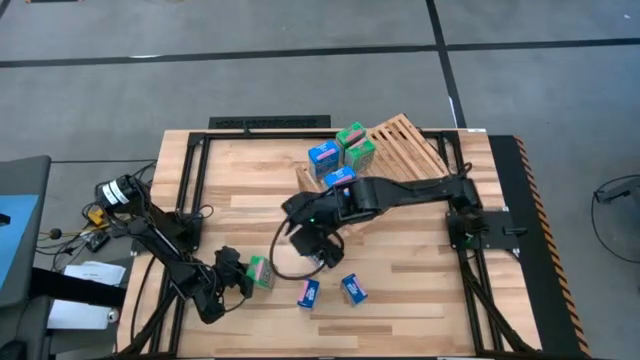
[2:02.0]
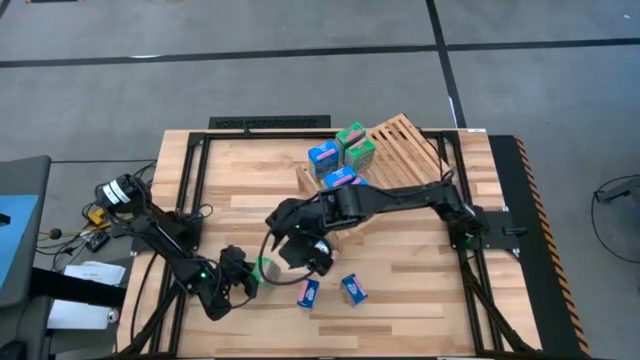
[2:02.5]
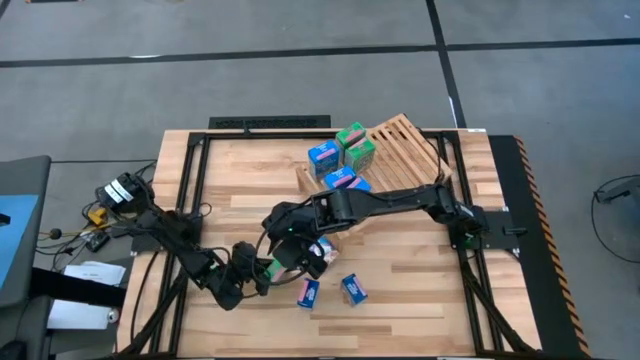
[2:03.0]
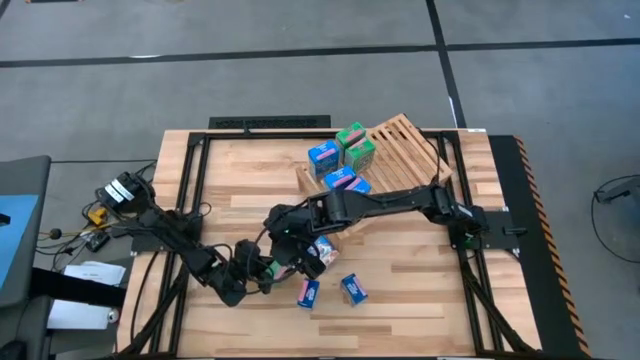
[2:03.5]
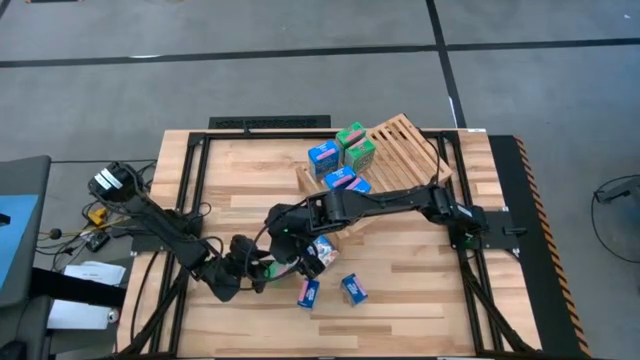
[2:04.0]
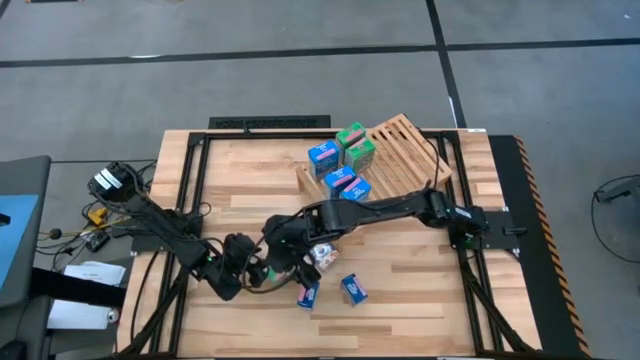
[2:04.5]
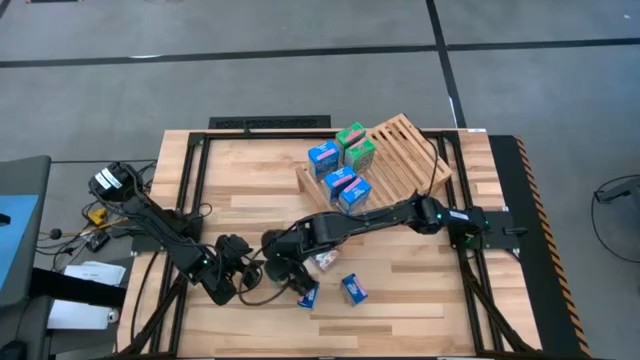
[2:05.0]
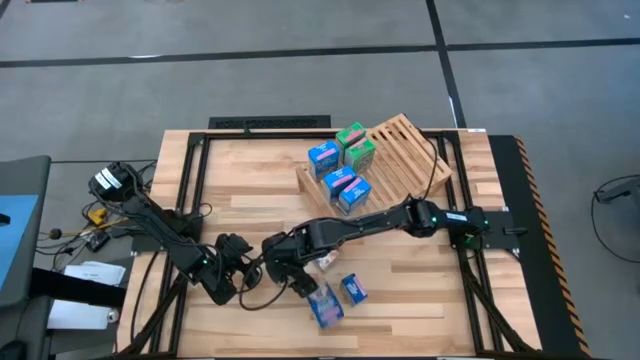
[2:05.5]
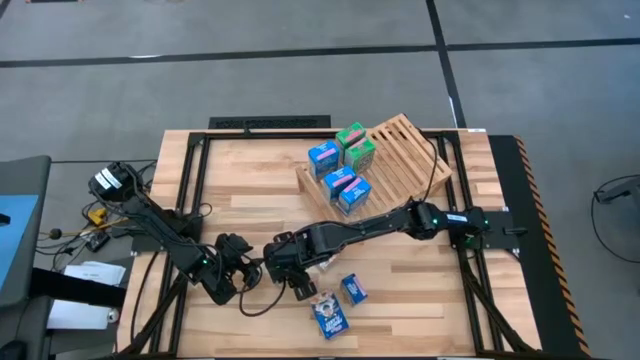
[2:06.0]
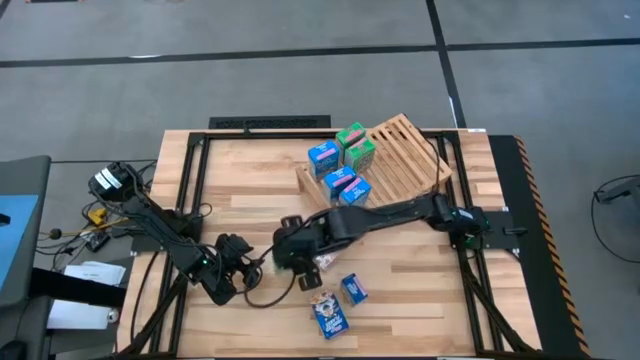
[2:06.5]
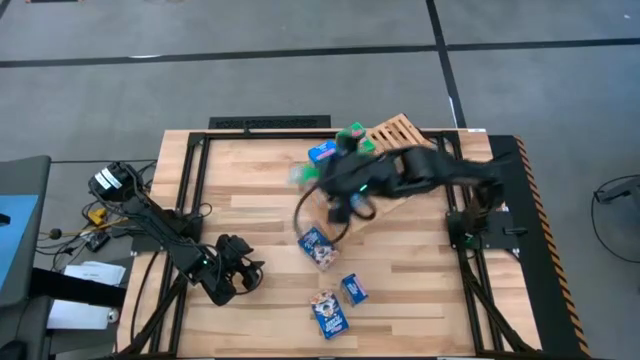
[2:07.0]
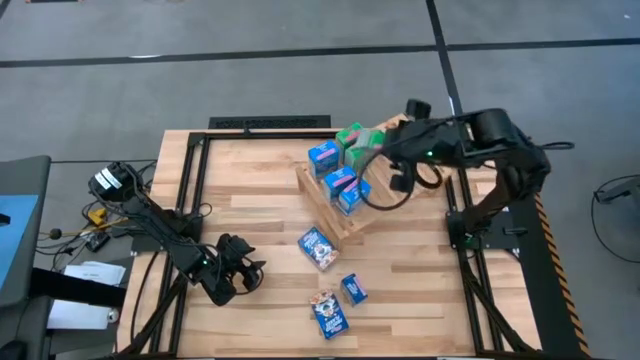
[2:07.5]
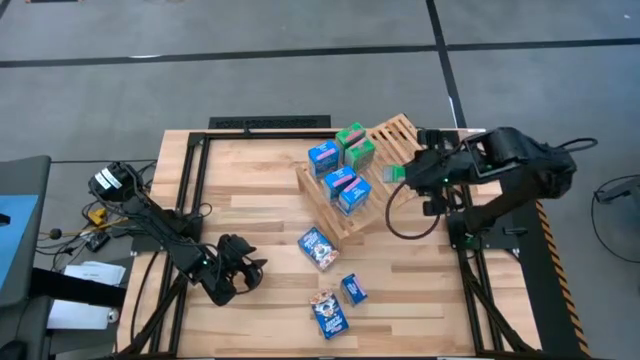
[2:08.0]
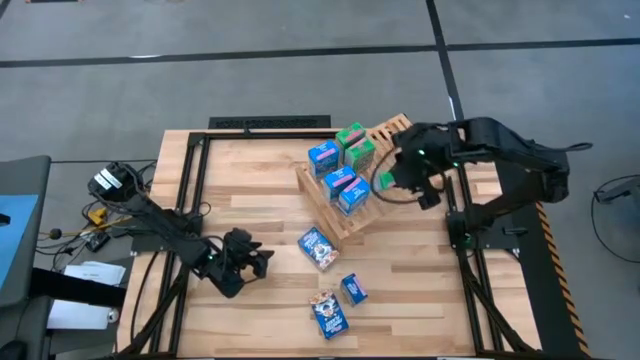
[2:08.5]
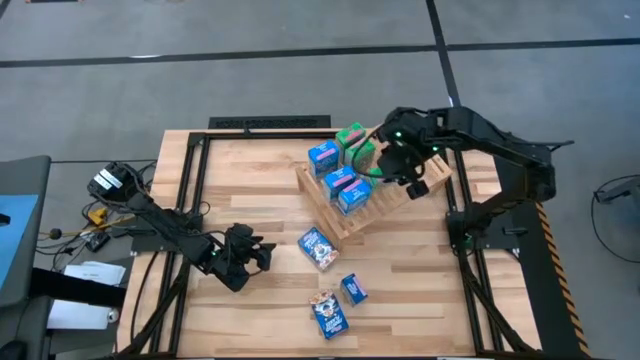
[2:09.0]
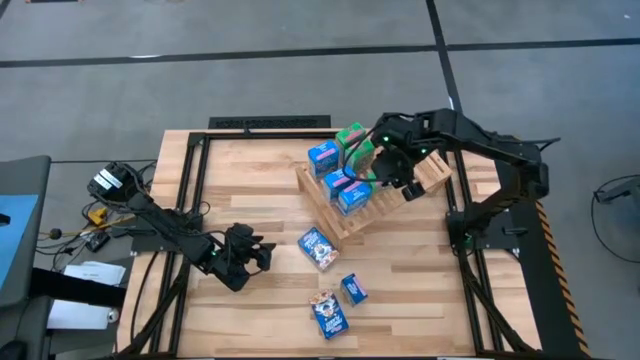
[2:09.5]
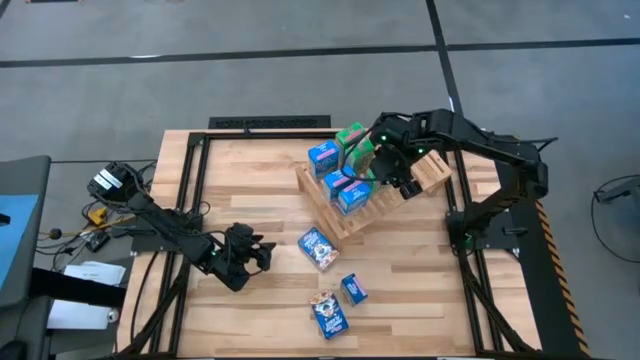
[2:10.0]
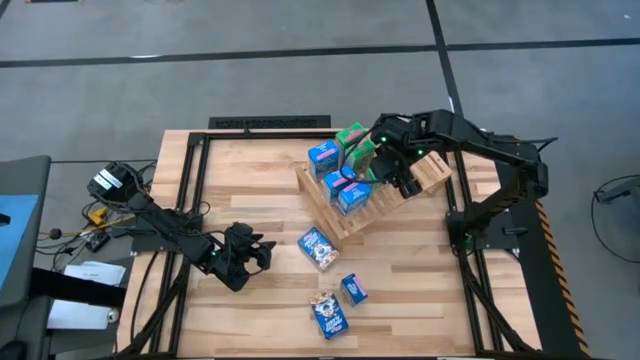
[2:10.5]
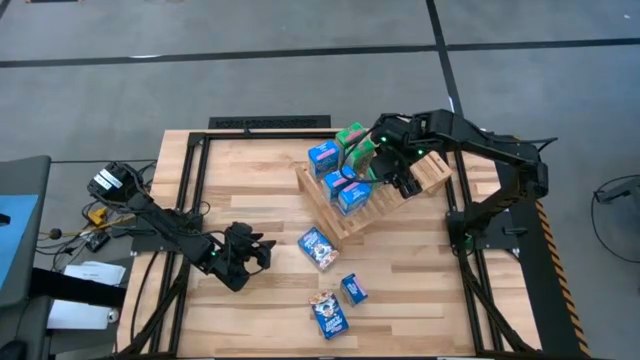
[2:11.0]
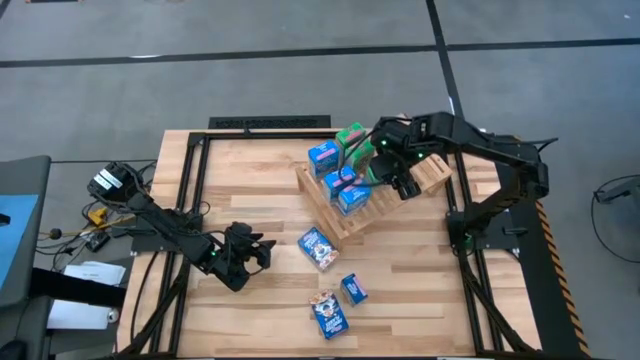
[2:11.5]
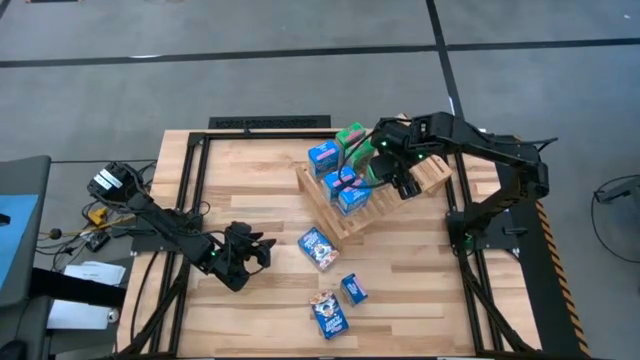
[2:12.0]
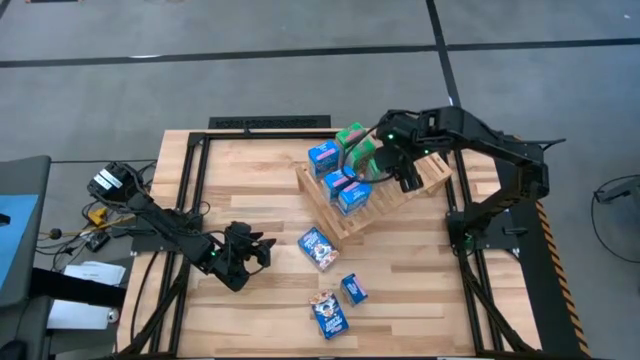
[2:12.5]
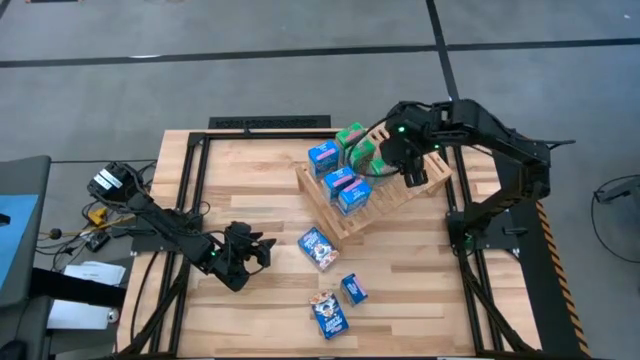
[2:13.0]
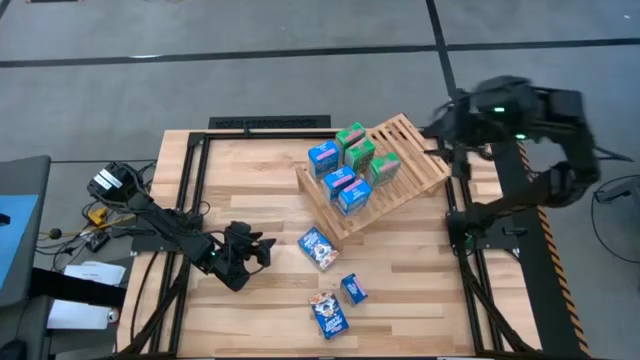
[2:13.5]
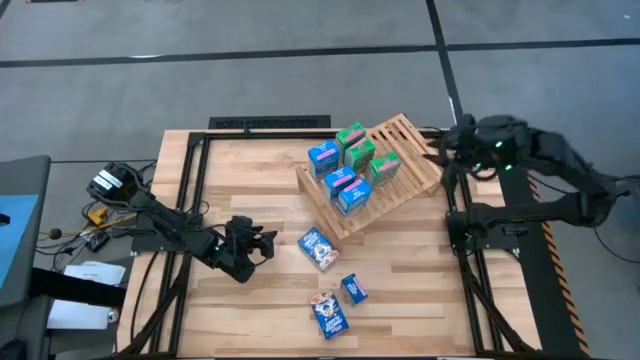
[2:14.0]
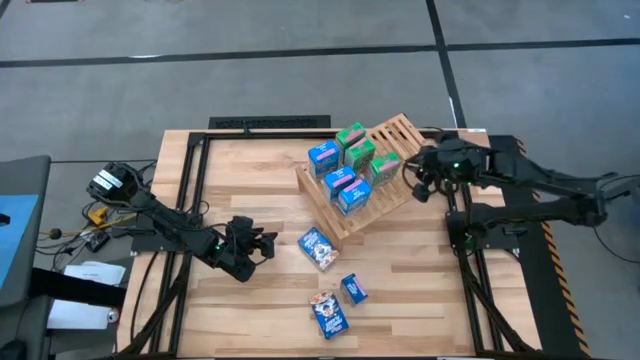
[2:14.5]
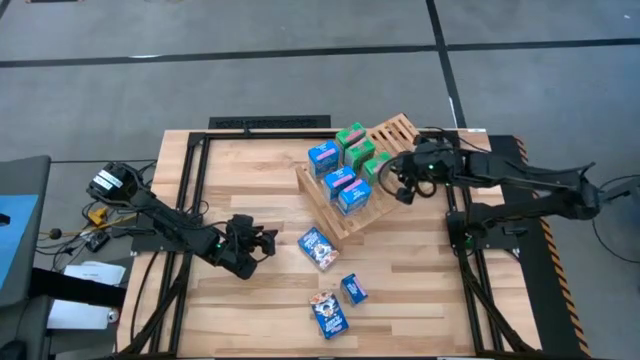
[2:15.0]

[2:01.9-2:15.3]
Task: Stack cereal on shelf
Put the green cereal box aligned with the other green cereal boxes on the shelf

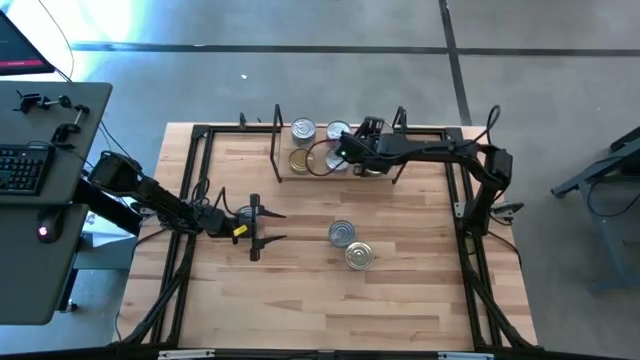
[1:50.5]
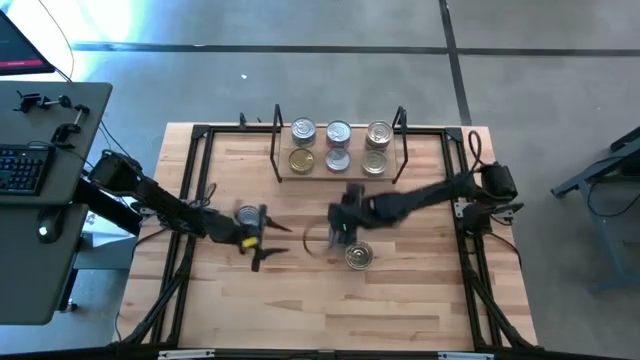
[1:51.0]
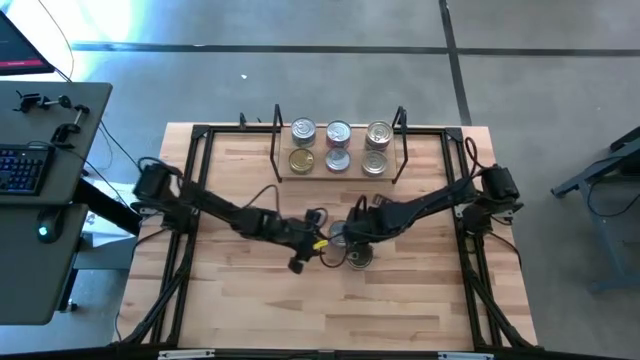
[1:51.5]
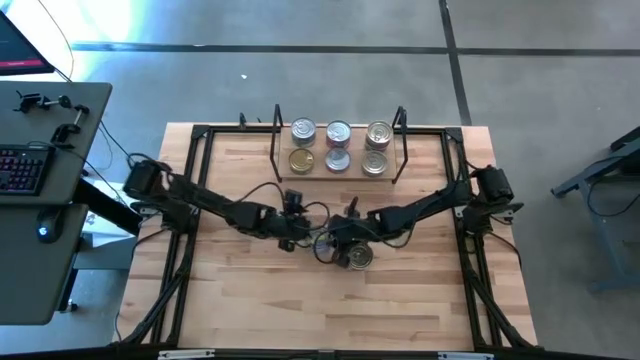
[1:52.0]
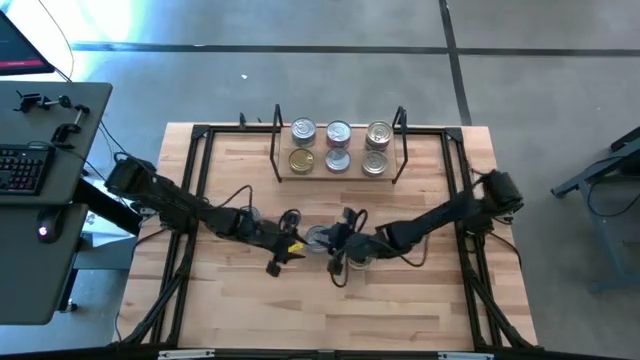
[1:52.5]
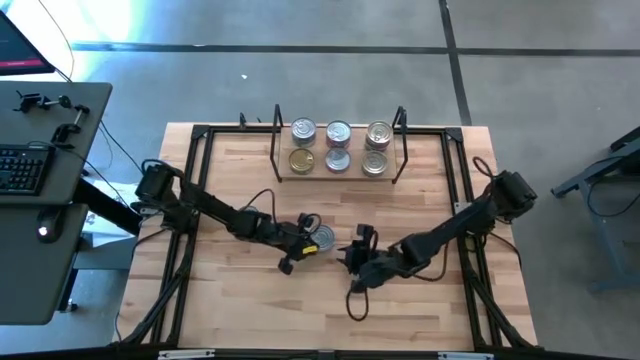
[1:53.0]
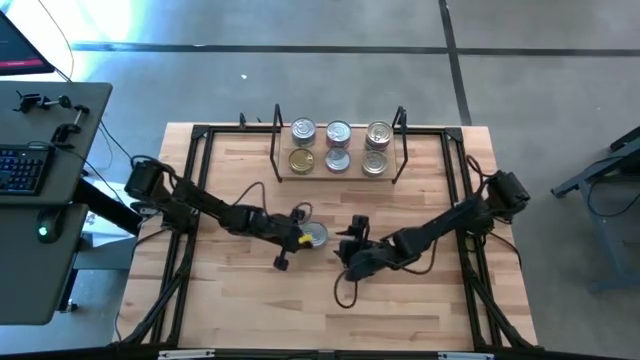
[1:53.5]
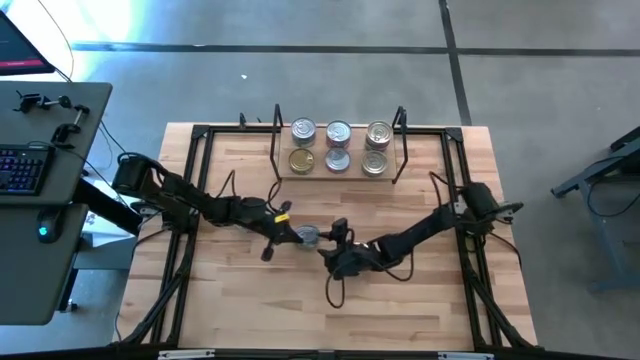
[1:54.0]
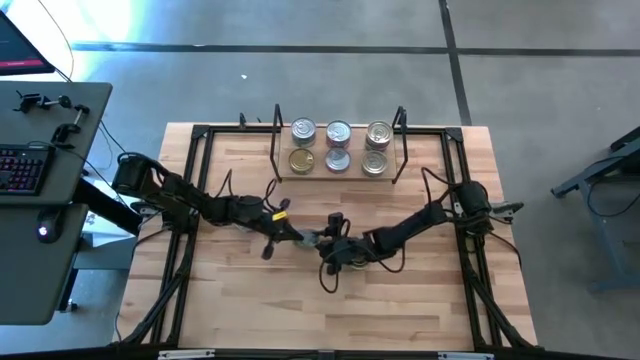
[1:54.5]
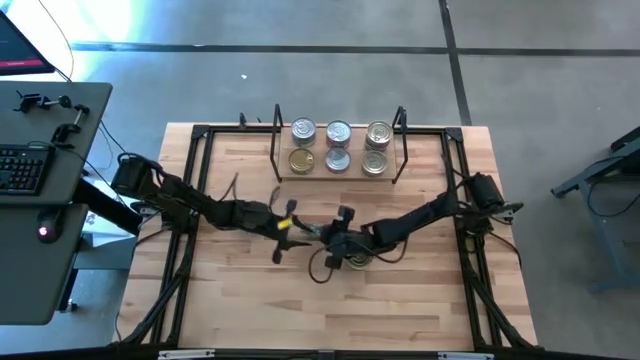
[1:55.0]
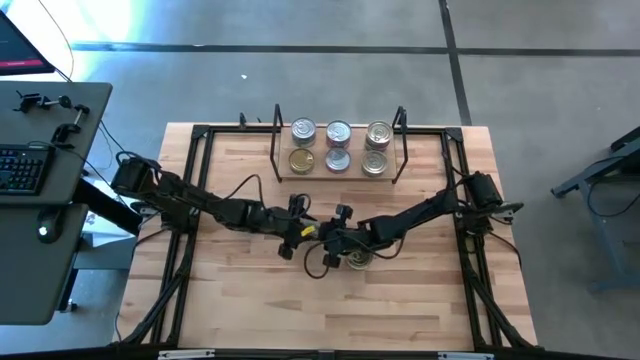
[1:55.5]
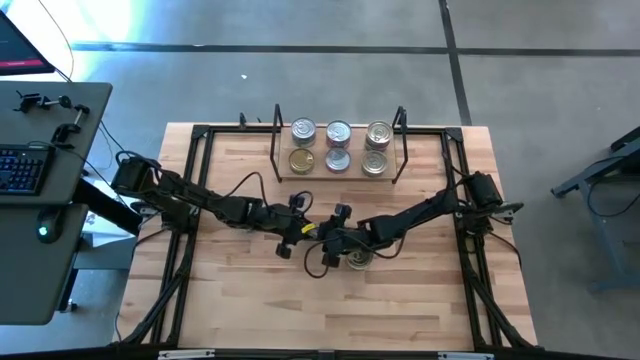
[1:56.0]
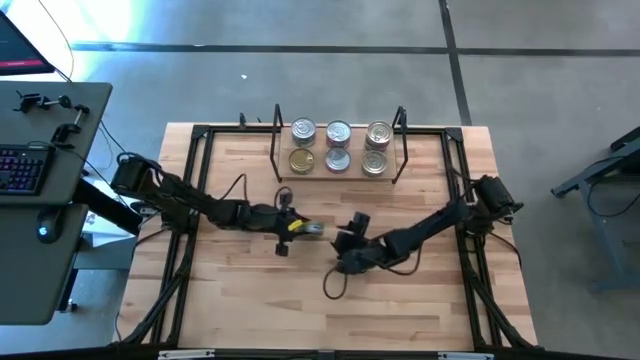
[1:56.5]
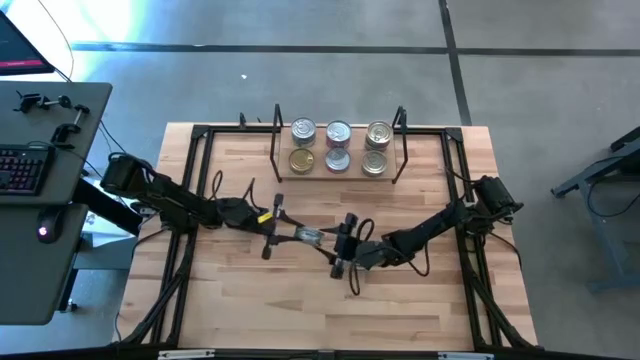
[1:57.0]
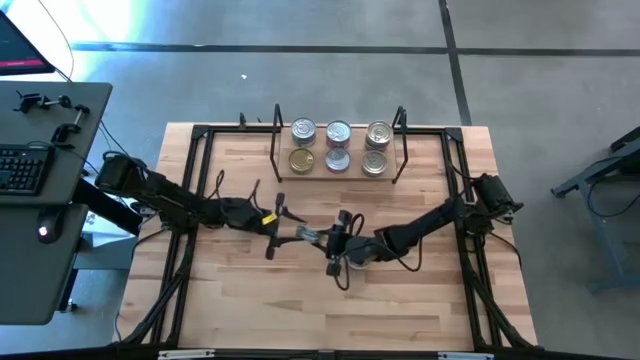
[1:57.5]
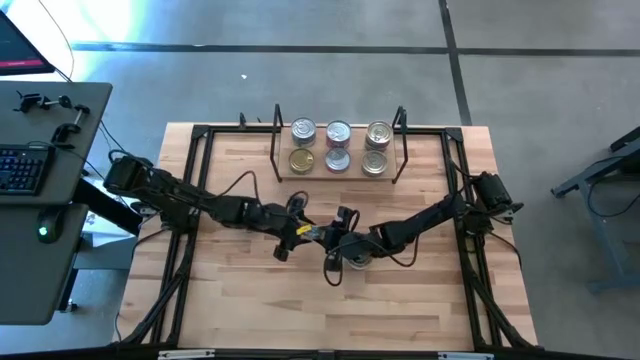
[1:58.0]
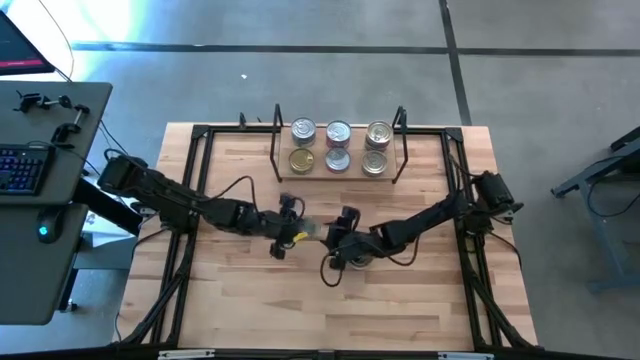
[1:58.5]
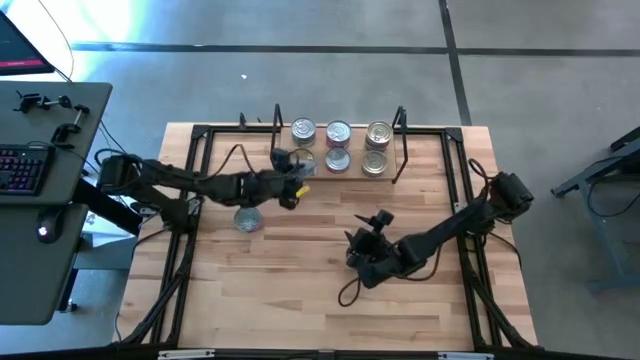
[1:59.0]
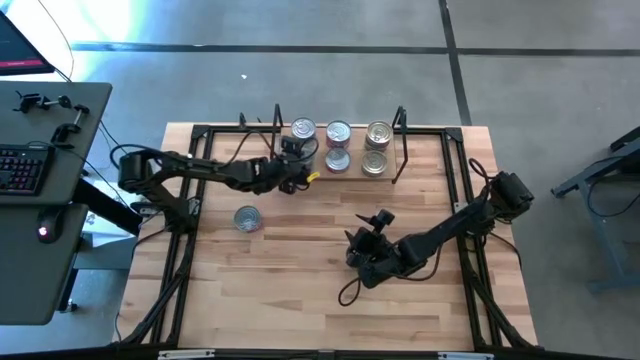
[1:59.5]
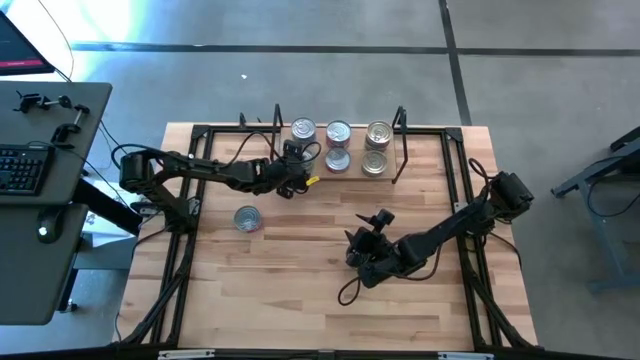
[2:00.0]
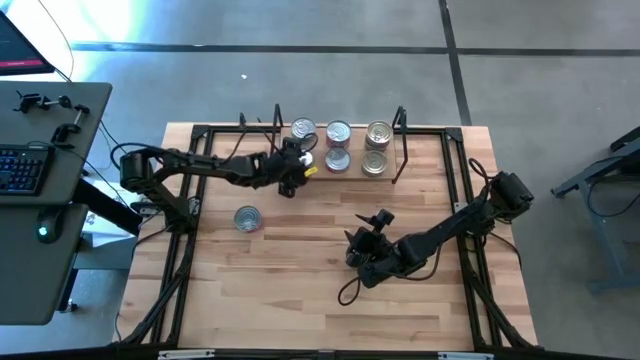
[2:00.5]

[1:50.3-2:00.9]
Task: Stack canned seafood by type on shelf
Stack the green tuna can on top of the other green tuna can on the shelf
